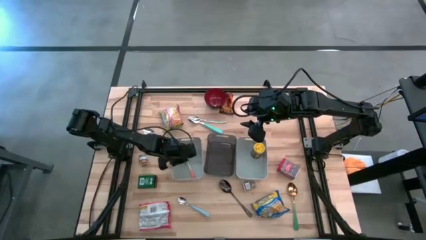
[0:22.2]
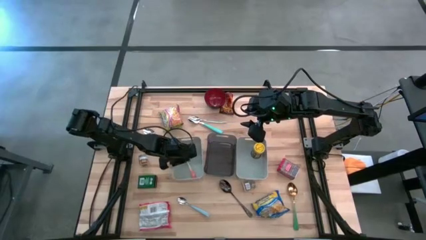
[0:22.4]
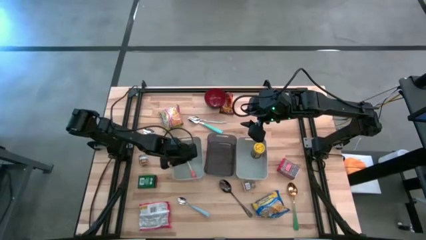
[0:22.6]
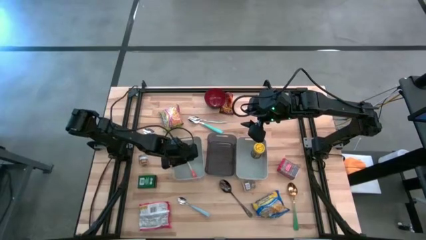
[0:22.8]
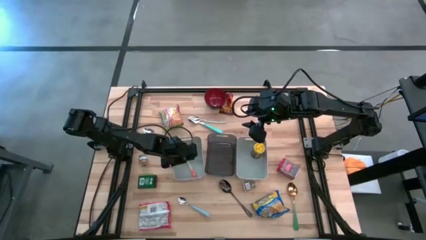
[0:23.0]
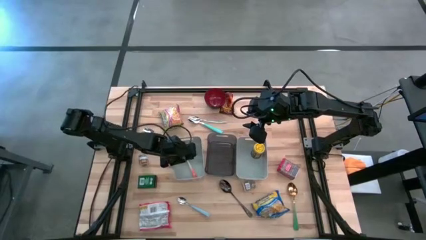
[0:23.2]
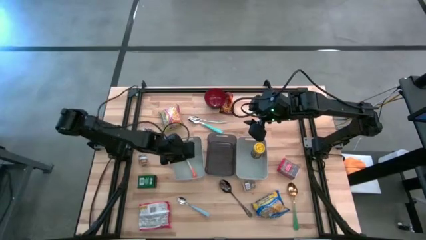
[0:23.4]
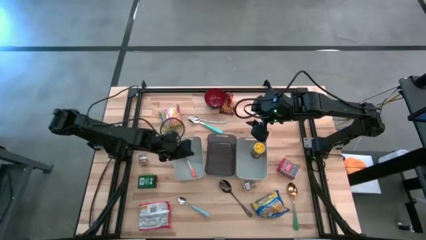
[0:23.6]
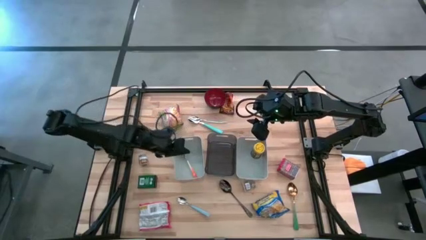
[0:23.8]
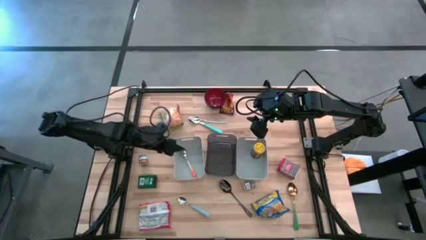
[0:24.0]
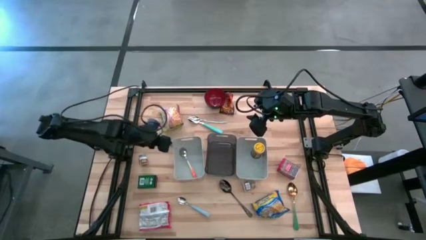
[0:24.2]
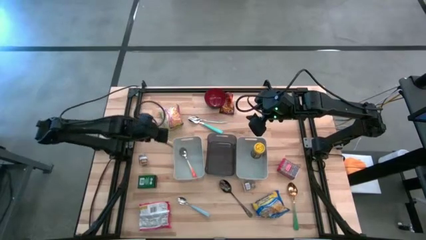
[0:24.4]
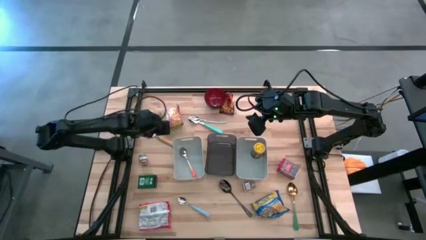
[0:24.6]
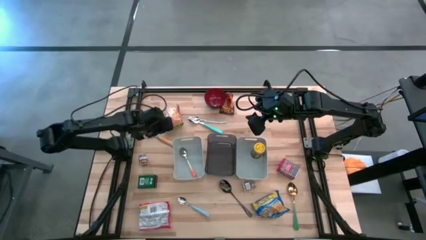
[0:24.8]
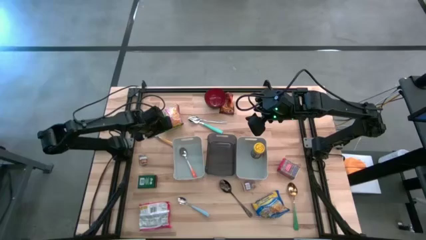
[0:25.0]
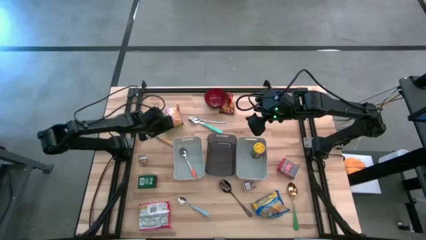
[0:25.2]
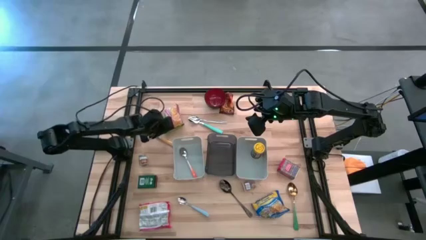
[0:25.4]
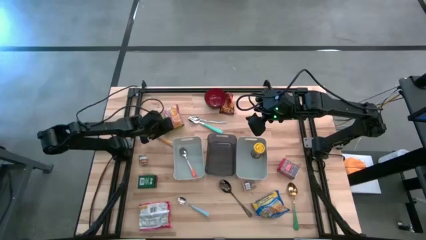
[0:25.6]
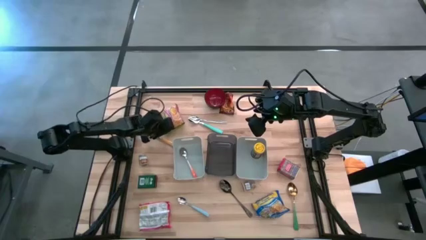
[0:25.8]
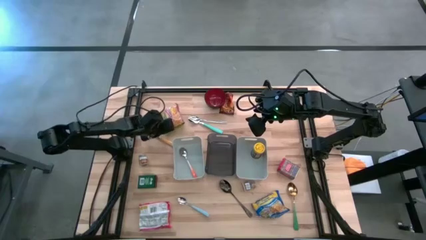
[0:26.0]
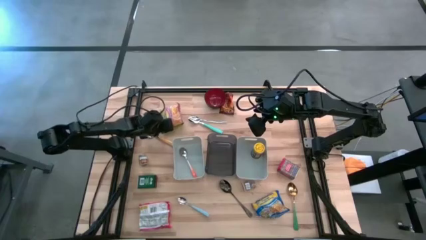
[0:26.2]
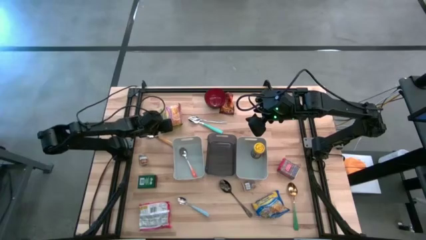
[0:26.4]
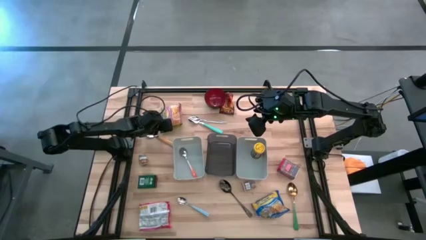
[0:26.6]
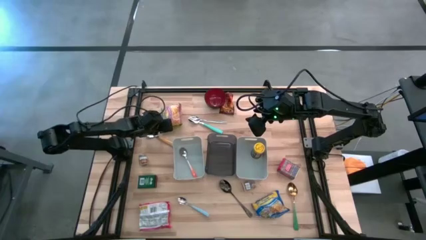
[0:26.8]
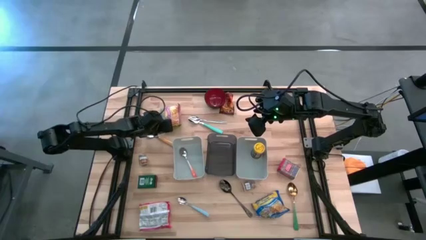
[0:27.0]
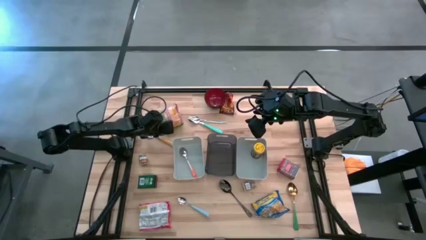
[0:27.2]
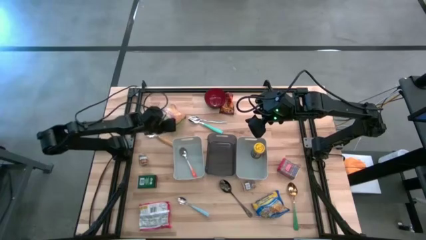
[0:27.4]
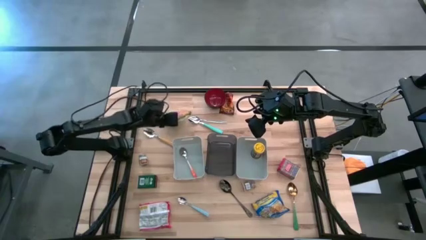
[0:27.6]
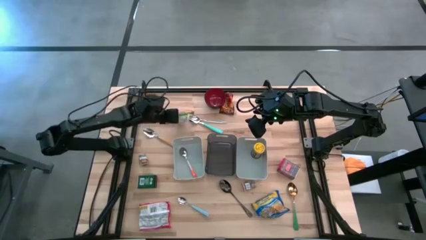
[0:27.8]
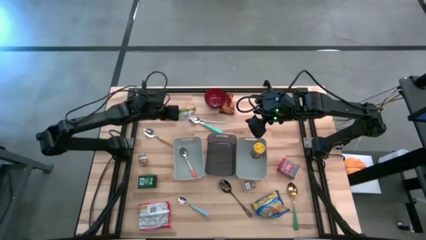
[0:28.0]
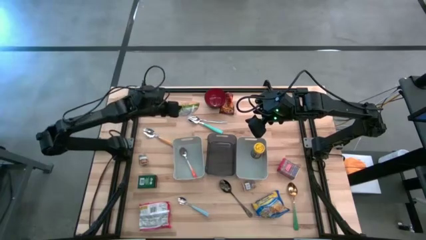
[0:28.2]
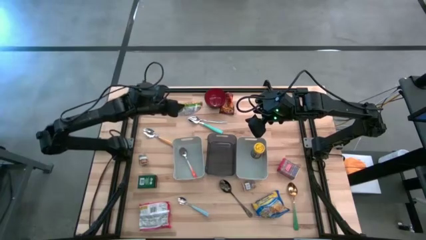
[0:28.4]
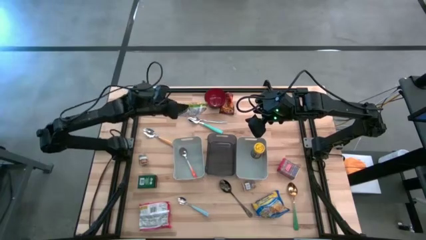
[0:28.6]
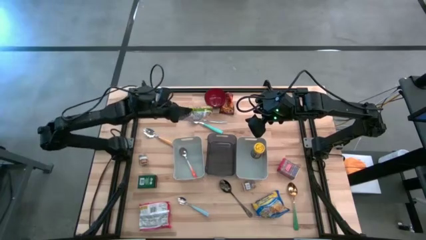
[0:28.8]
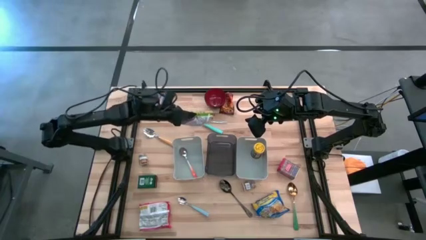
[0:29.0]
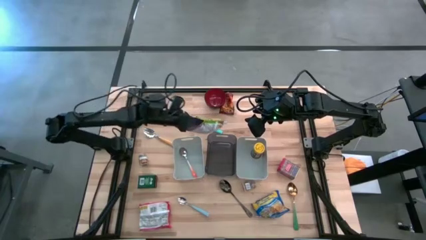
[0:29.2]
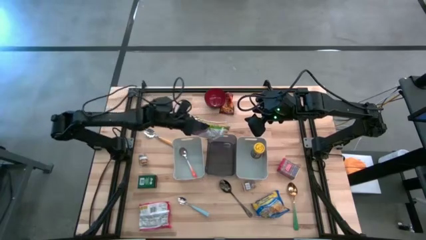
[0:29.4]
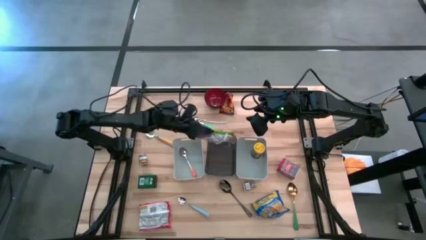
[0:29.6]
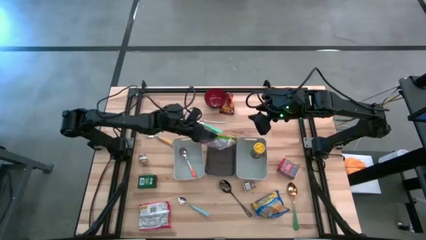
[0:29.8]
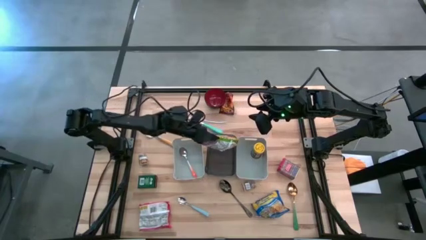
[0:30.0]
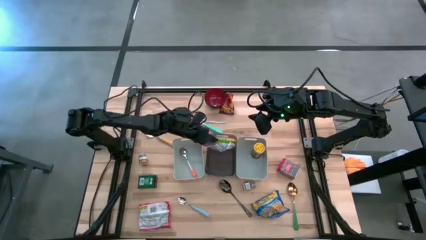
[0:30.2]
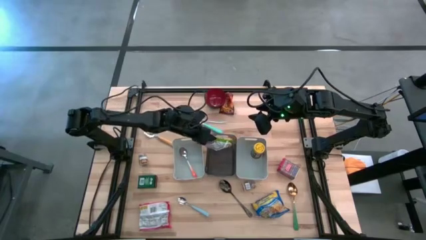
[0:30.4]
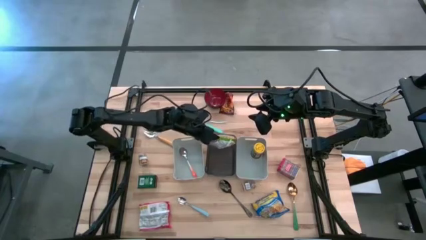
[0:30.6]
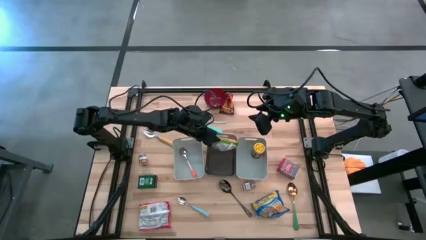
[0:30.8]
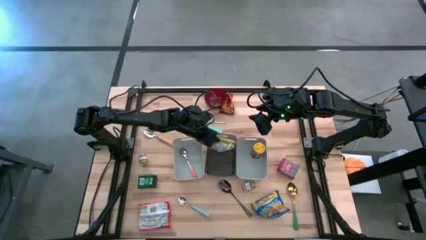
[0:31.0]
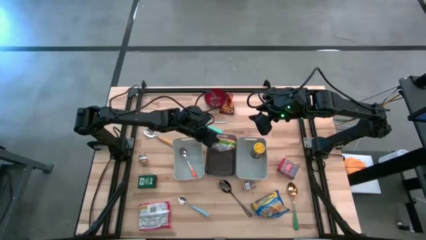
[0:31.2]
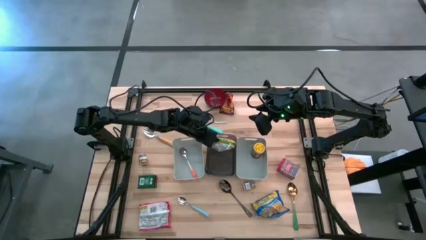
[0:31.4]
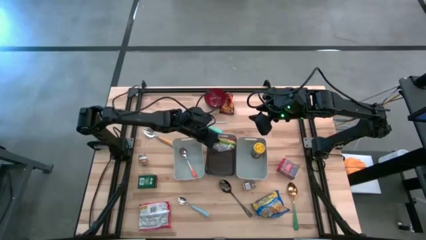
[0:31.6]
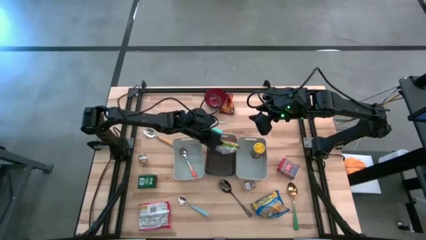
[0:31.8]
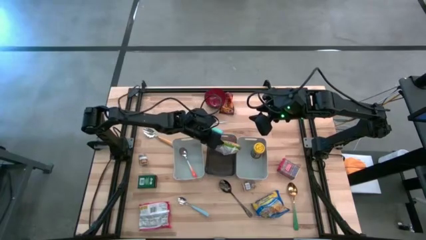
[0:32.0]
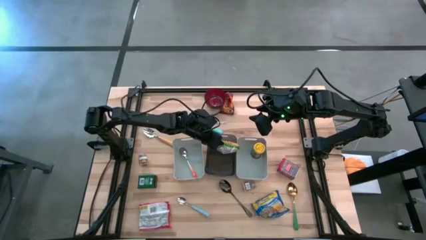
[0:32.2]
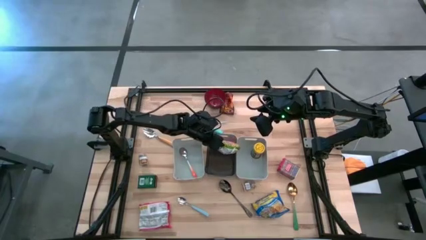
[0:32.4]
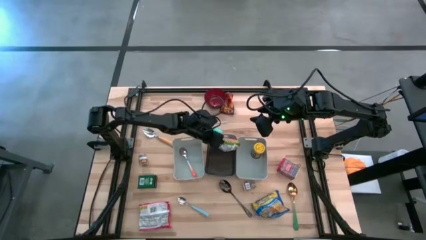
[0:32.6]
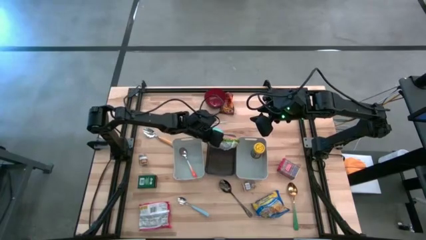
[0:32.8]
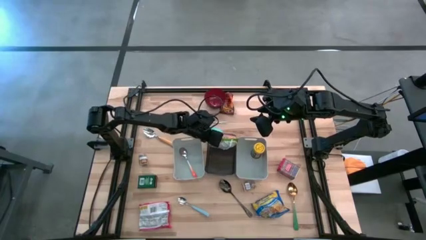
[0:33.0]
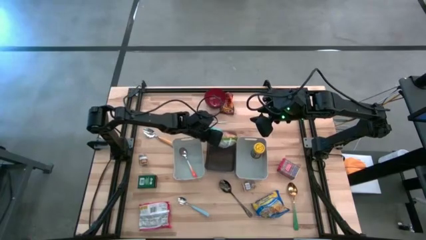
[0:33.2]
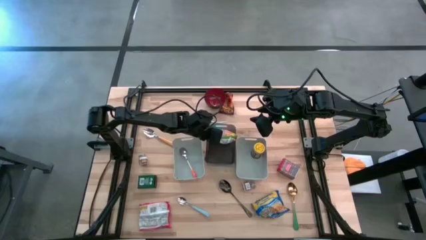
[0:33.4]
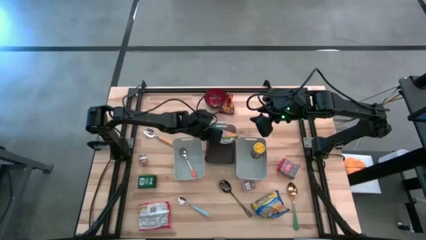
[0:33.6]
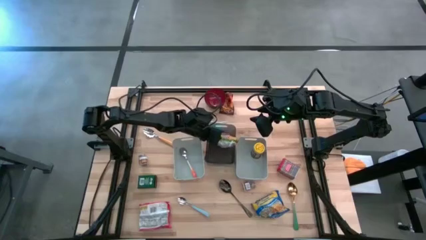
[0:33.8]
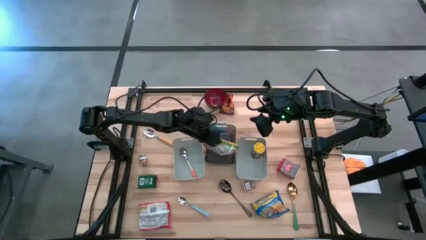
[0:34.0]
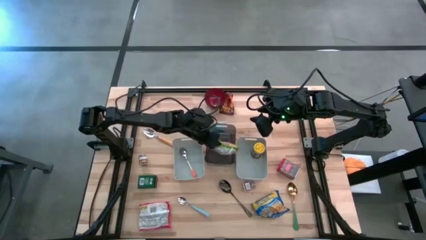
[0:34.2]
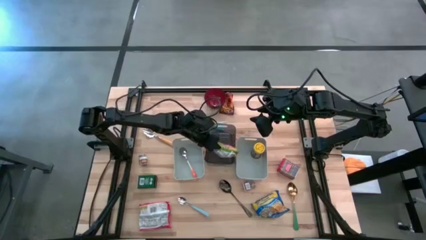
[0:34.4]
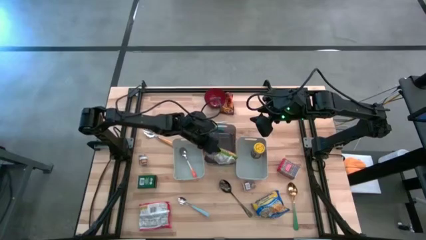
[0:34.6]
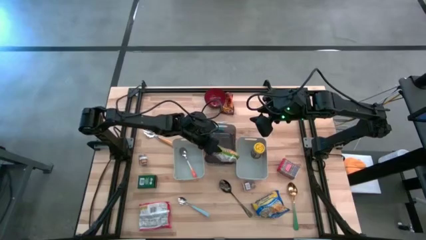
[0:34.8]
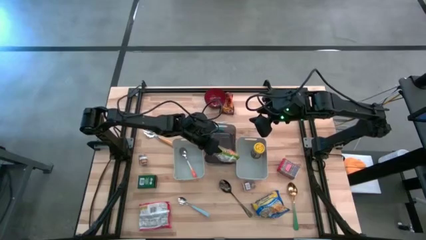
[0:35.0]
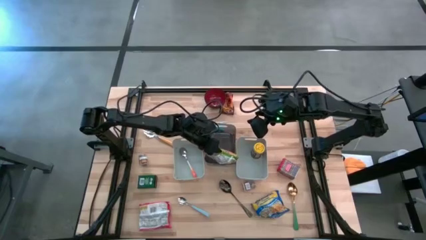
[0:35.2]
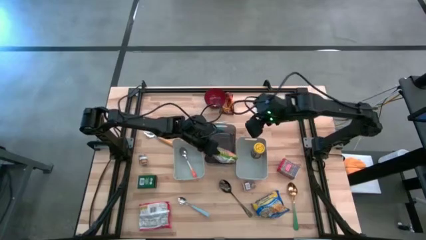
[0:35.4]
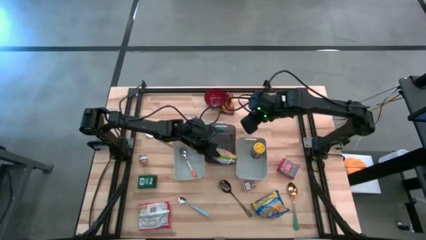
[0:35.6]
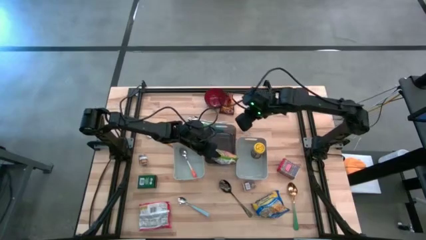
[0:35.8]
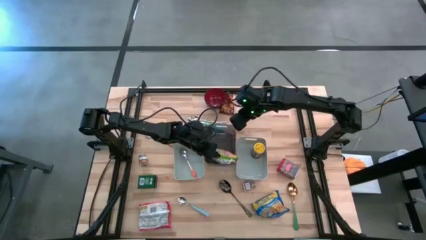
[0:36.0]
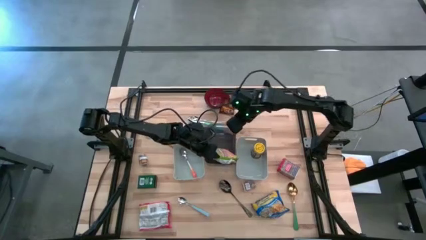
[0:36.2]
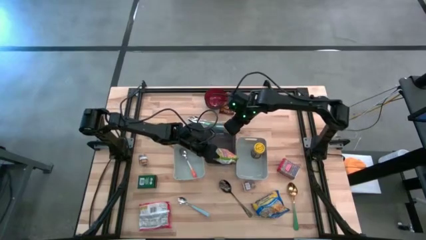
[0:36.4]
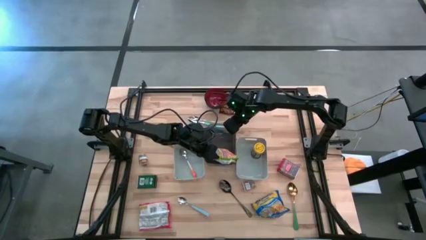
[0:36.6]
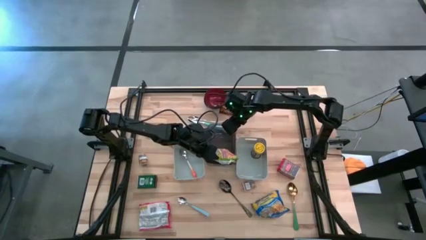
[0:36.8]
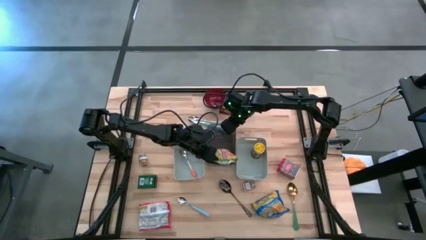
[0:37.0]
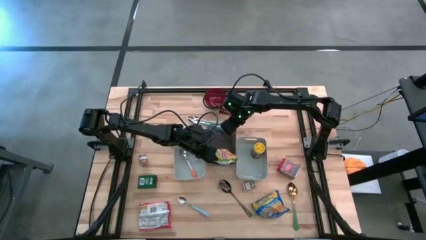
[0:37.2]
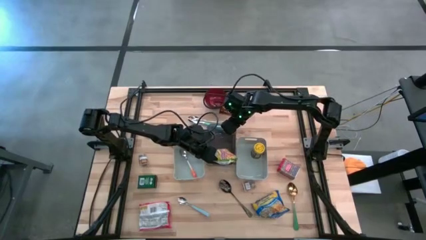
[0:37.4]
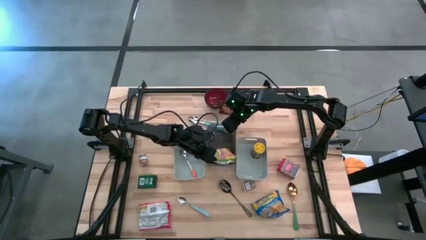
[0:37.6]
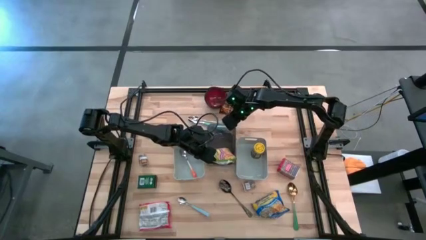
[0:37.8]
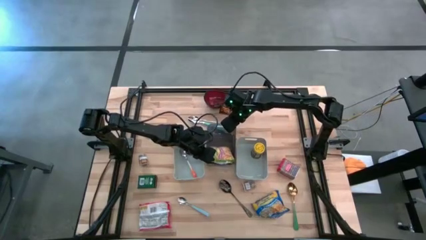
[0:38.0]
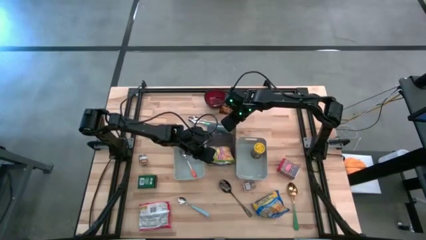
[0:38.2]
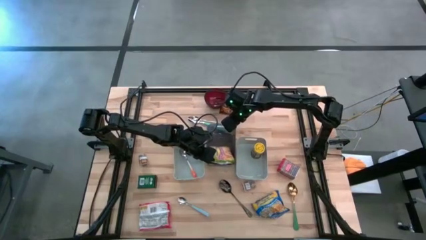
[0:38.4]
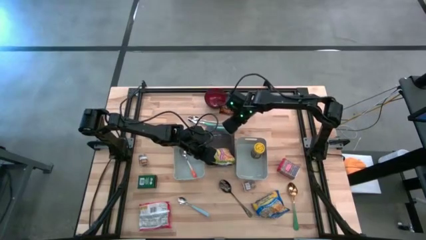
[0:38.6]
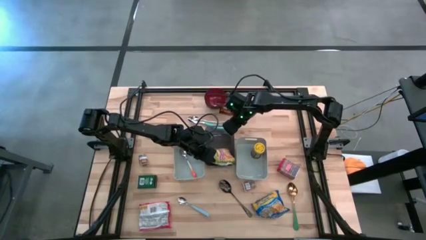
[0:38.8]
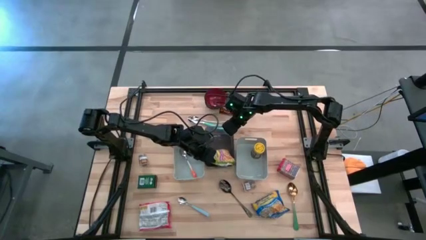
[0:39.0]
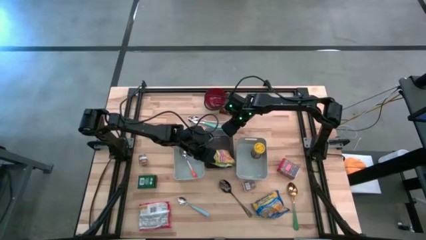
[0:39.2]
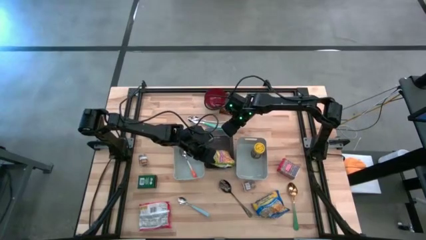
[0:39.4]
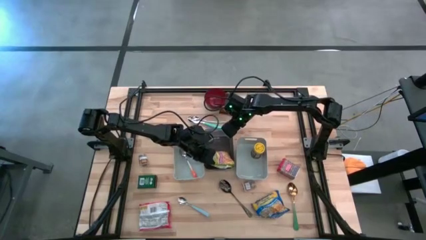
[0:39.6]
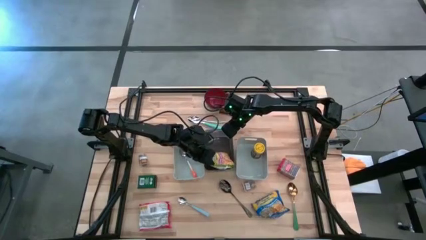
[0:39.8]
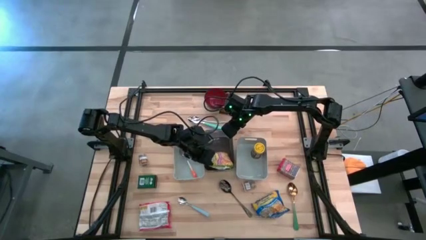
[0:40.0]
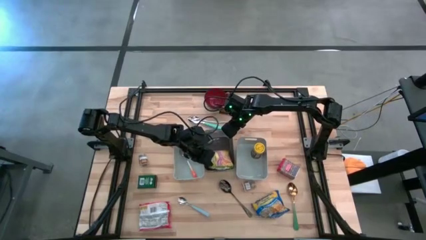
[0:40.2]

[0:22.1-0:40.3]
Put the green noodle pack into the black bin
